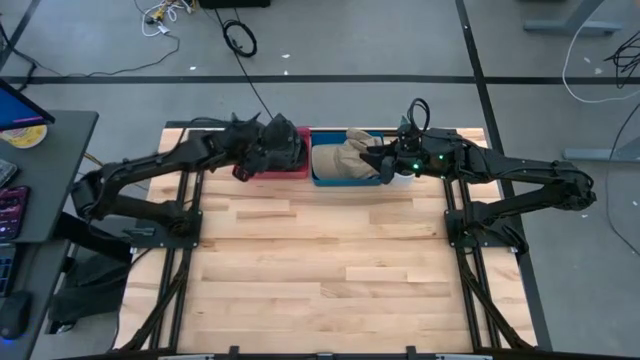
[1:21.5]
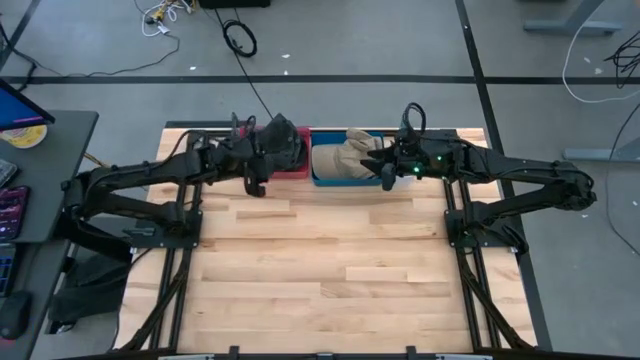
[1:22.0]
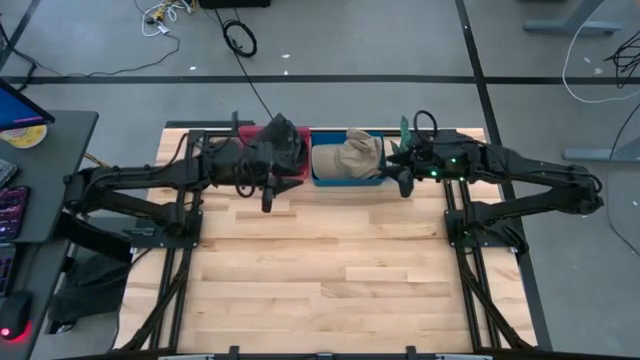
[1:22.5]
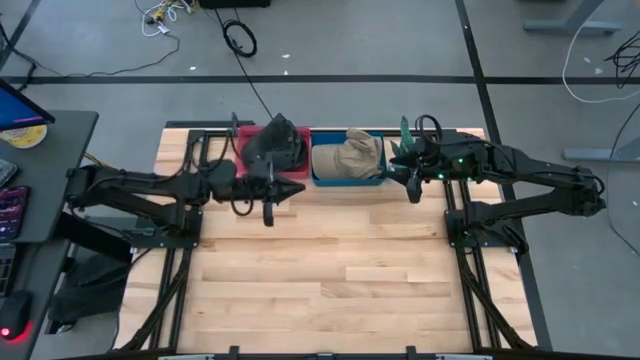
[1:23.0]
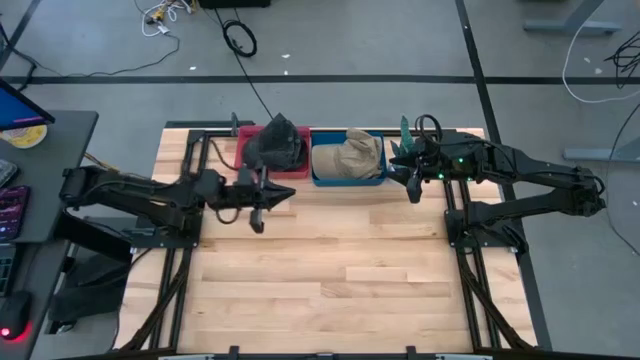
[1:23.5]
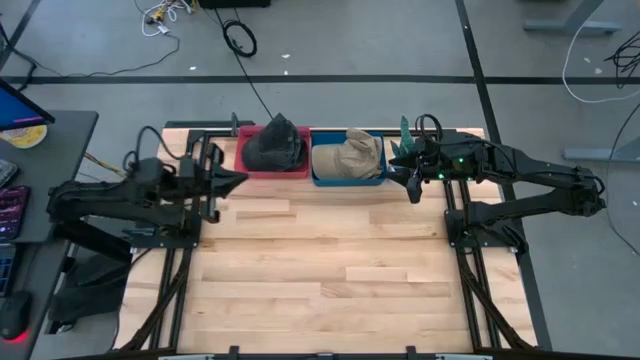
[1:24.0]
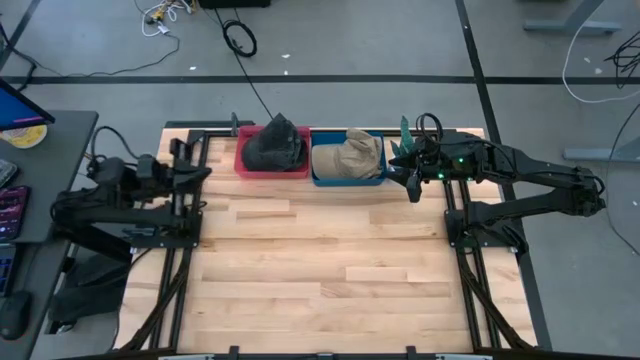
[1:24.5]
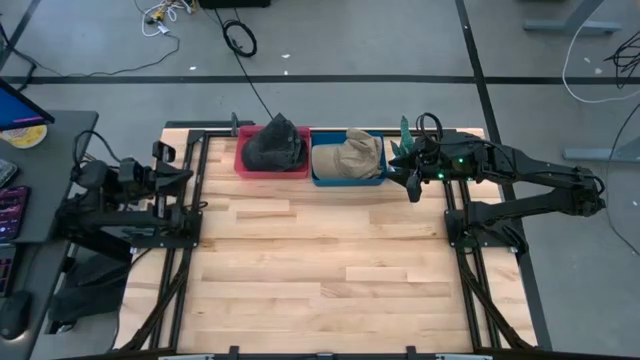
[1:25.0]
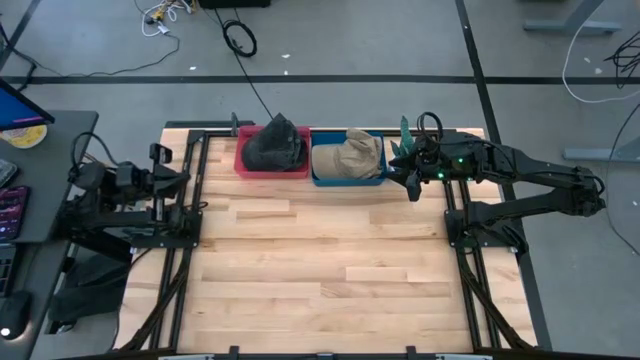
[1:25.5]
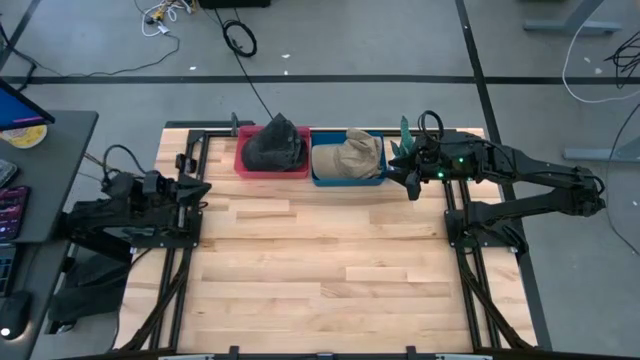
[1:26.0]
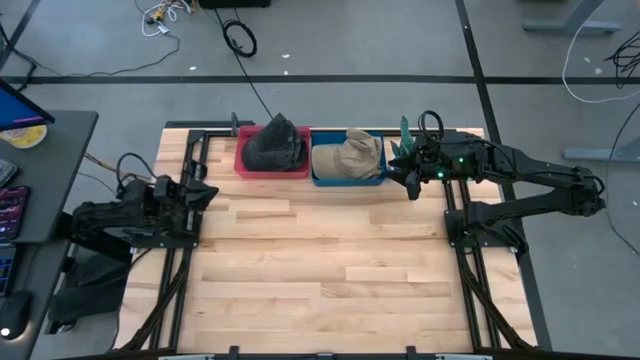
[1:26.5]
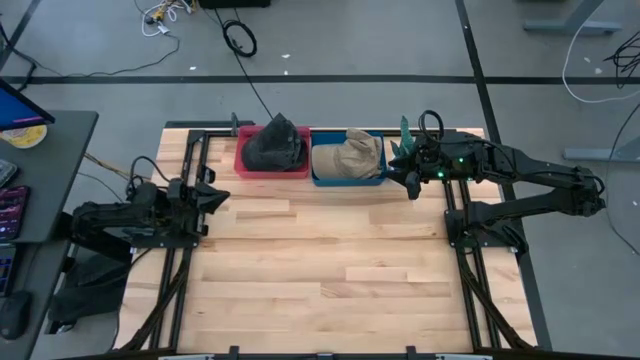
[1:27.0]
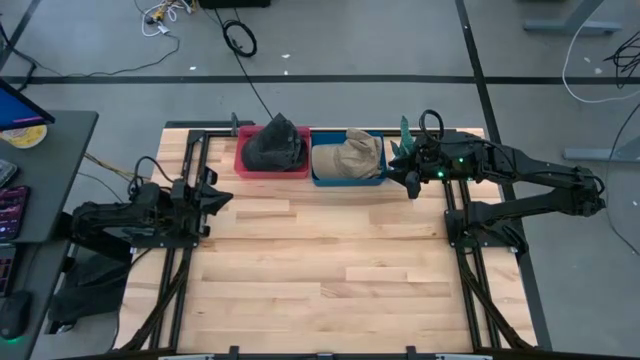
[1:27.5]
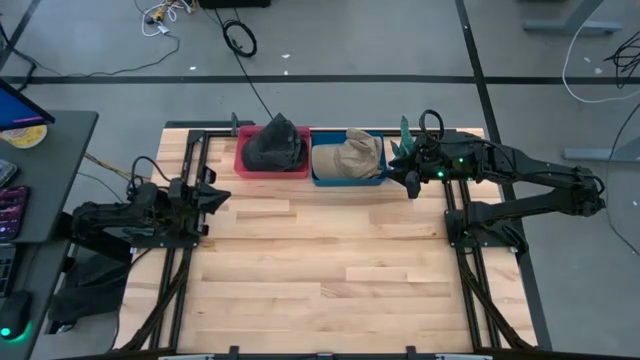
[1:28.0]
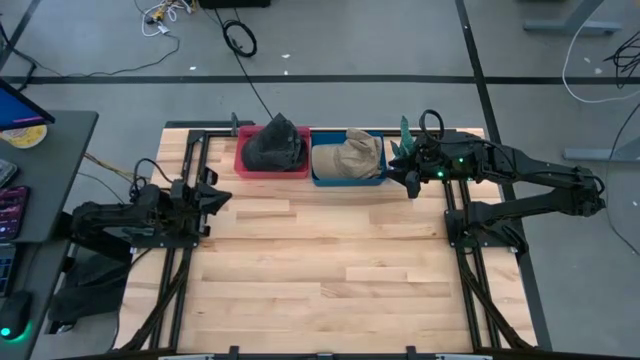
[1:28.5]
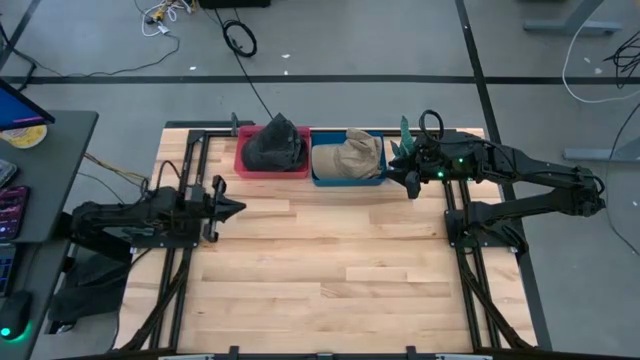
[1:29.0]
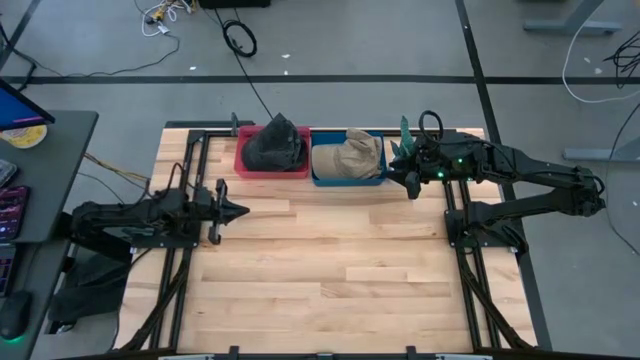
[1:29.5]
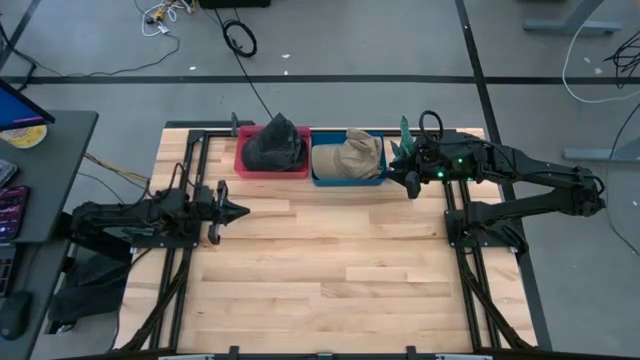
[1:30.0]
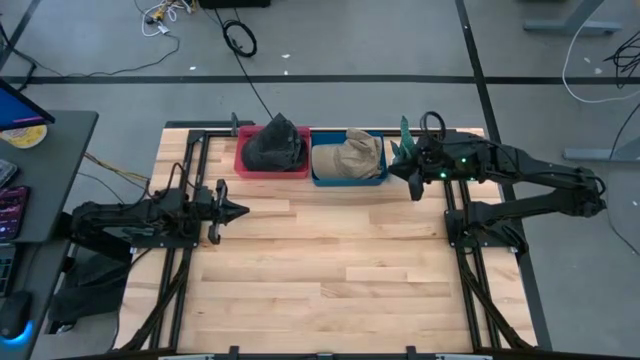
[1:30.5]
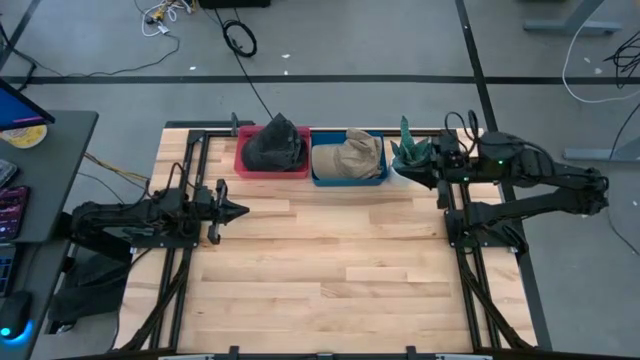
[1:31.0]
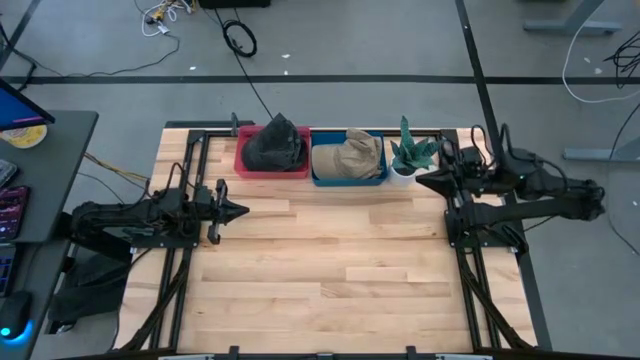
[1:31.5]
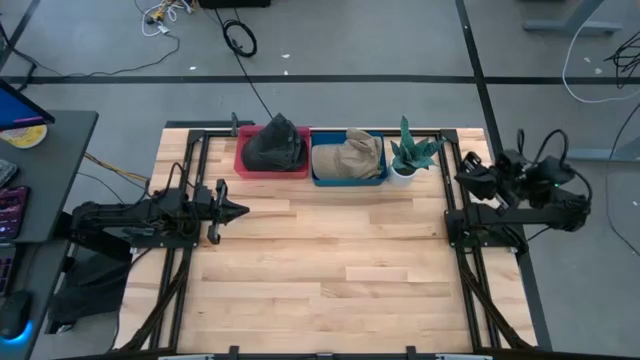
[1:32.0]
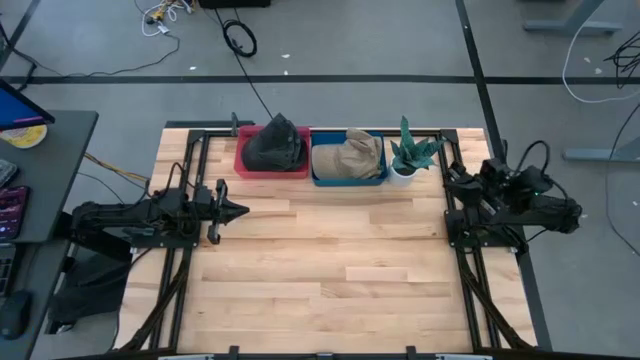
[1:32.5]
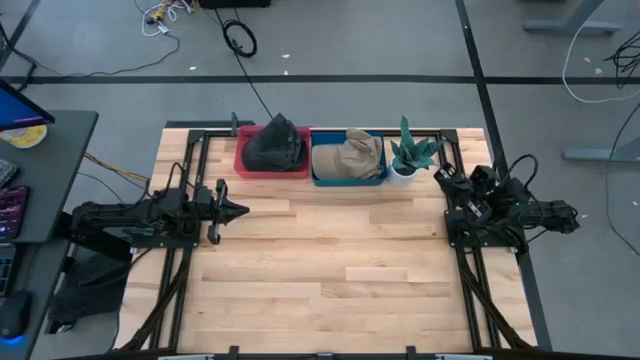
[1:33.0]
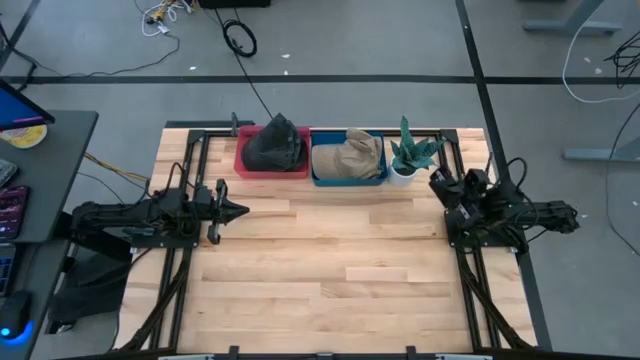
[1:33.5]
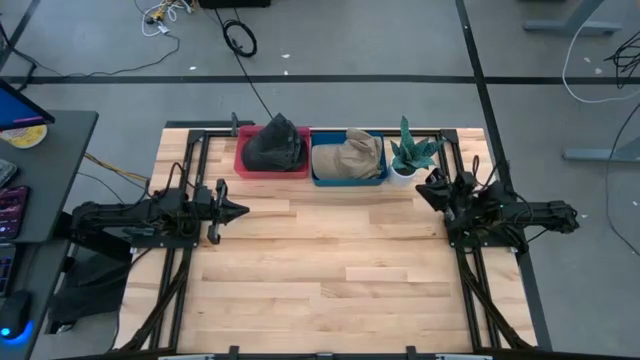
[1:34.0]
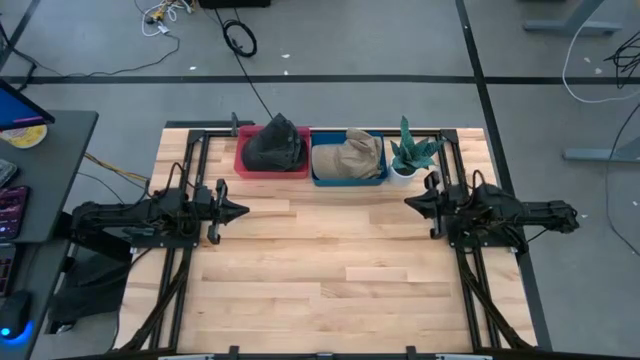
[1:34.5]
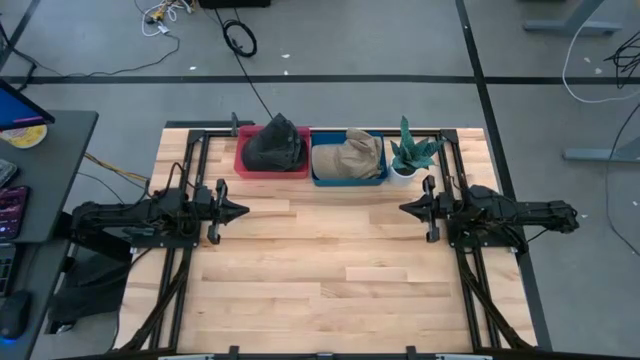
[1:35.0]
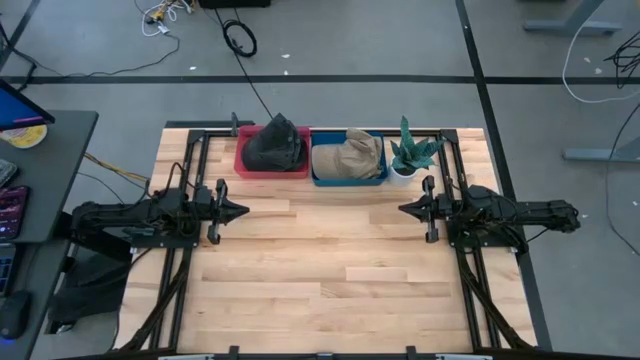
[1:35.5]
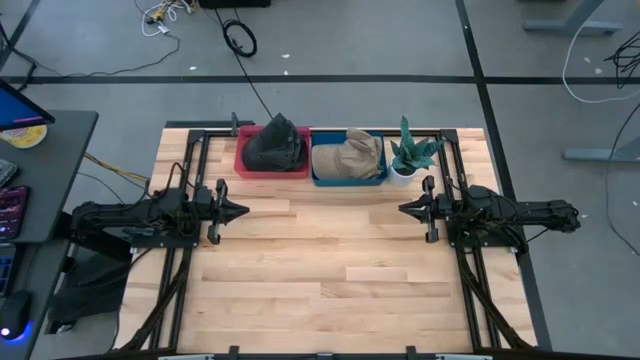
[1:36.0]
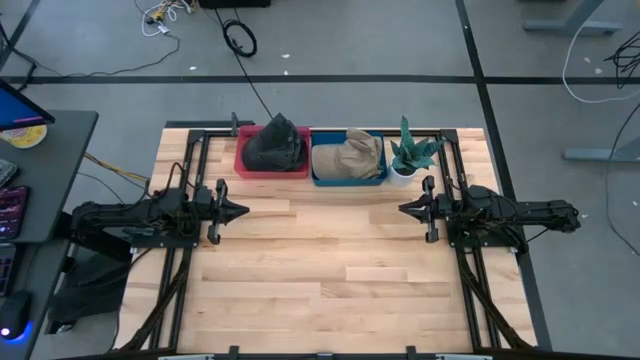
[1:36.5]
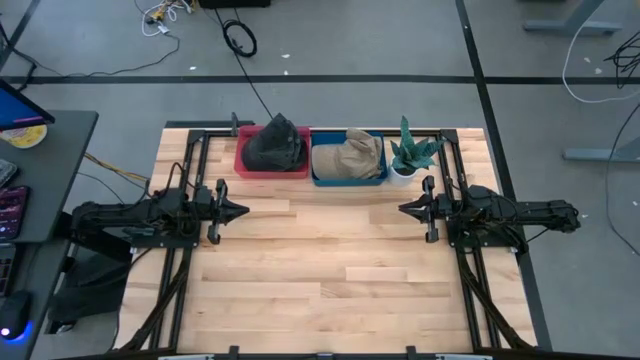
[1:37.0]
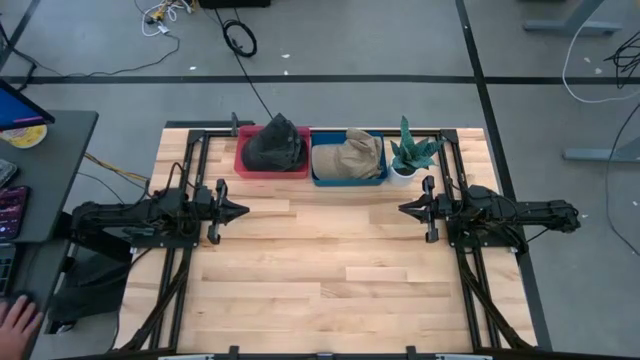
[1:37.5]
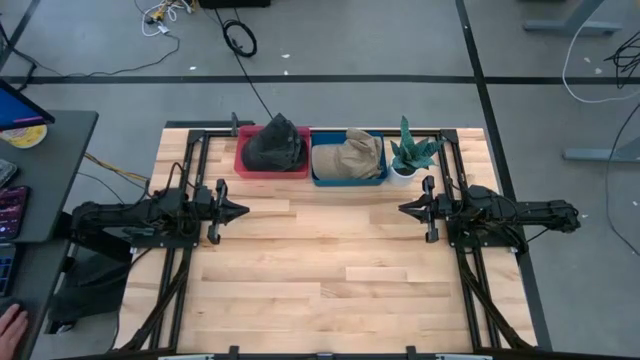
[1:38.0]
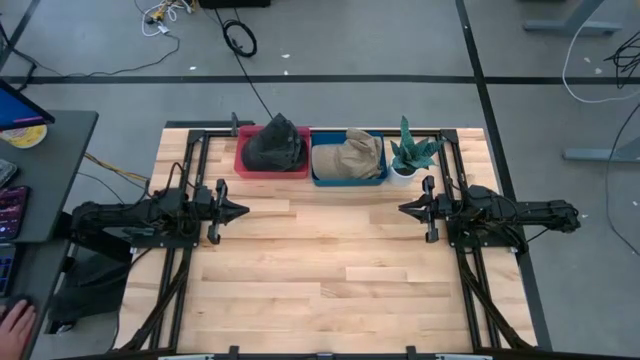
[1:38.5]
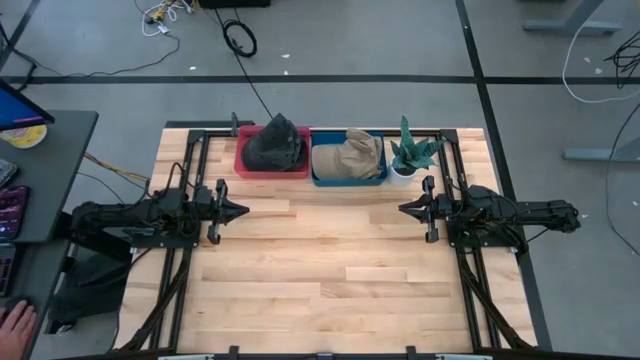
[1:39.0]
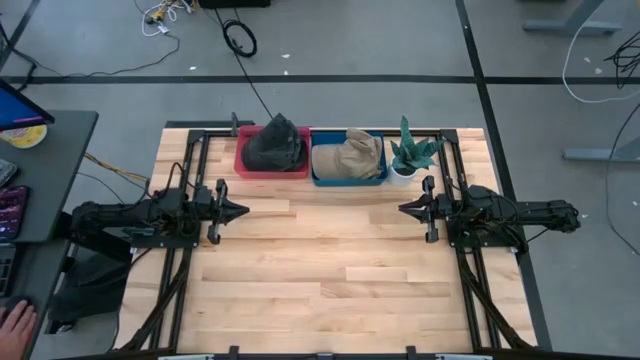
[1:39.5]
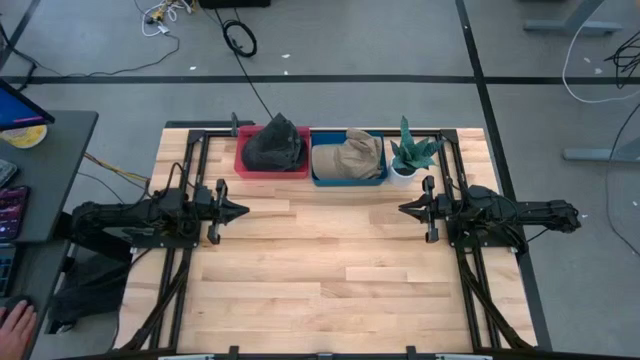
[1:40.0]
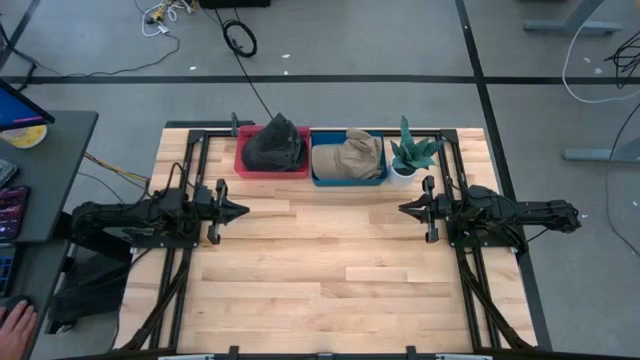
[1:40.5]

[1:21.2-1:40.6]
Task: Pick & Place hat
Return to Home Position

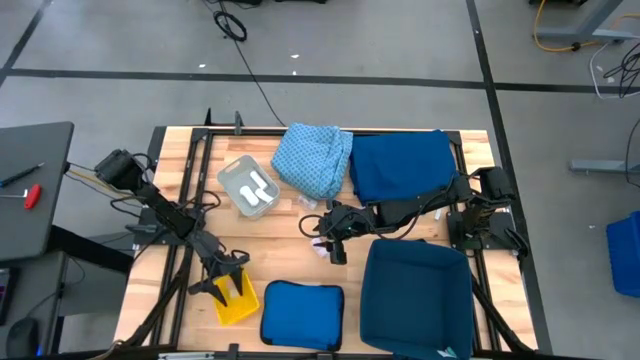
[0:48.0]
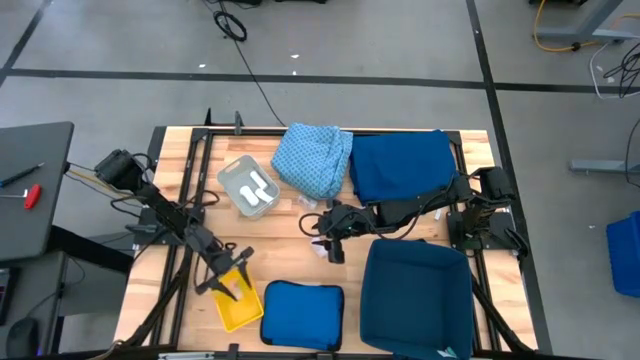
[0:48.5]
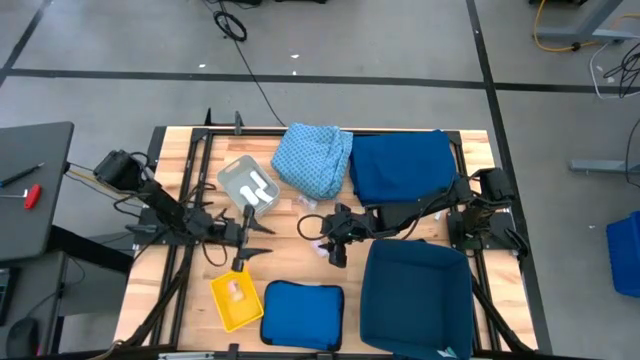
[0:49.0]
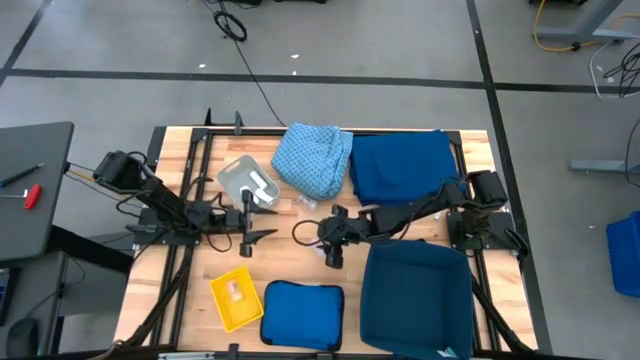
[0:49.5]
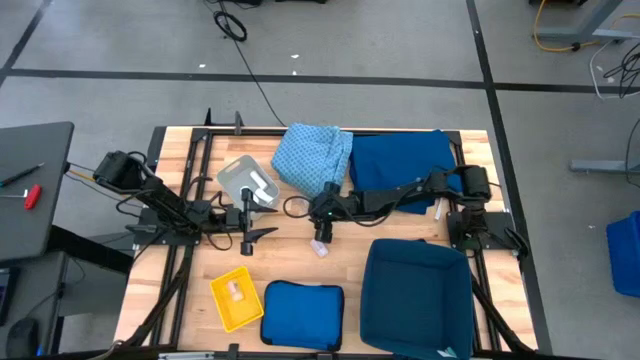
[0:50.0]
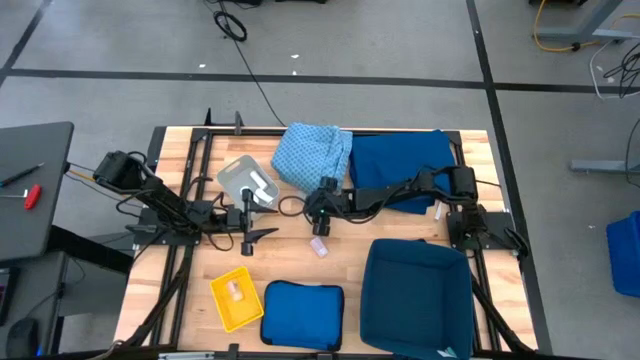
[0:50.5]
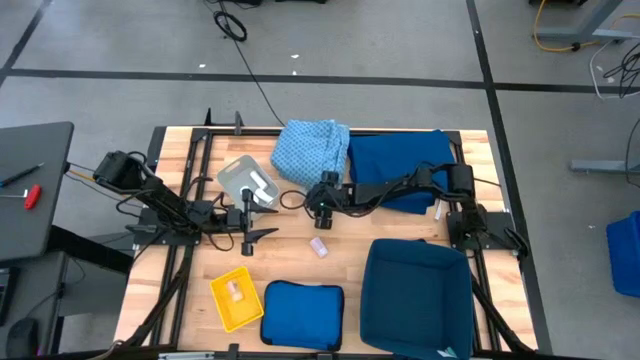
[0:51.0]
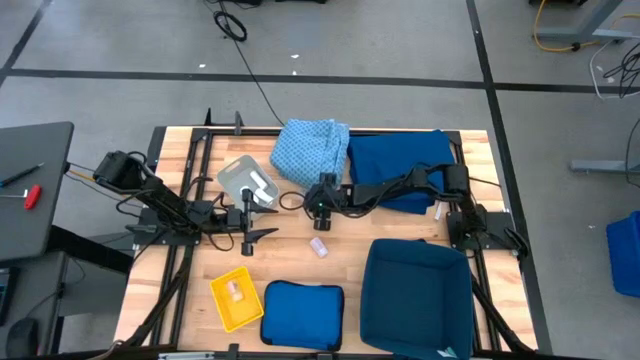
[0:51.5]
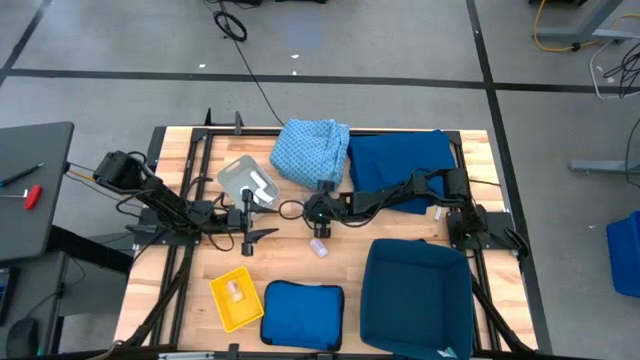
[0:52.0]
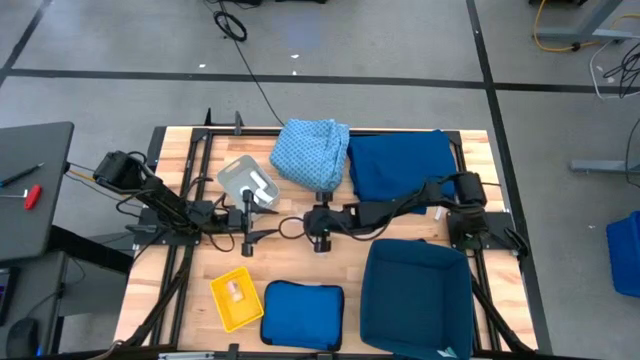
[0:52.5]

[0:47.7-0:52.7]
Task: Pick & place medical supplies in basket/bin
Put the top white medicine bottle into the yellow bin
